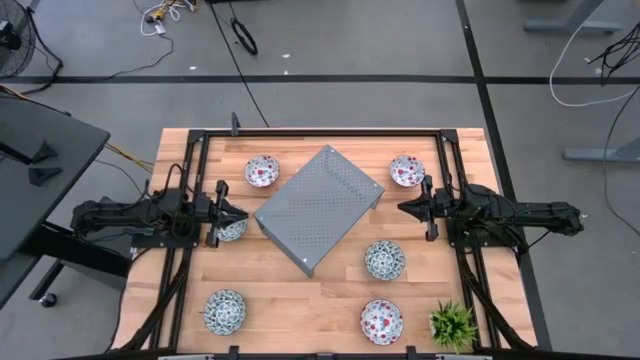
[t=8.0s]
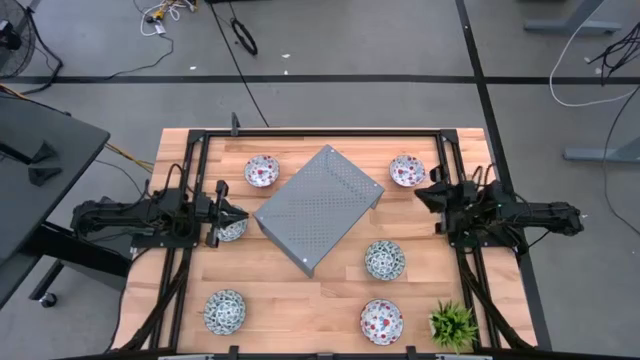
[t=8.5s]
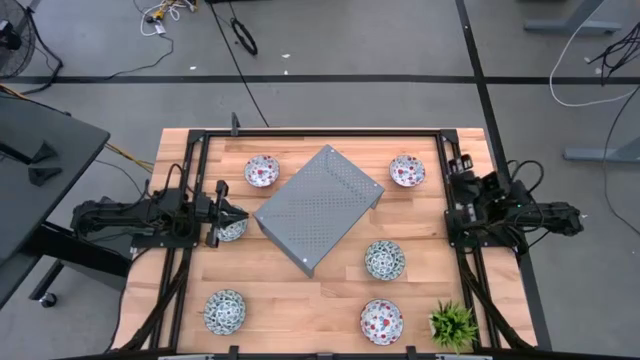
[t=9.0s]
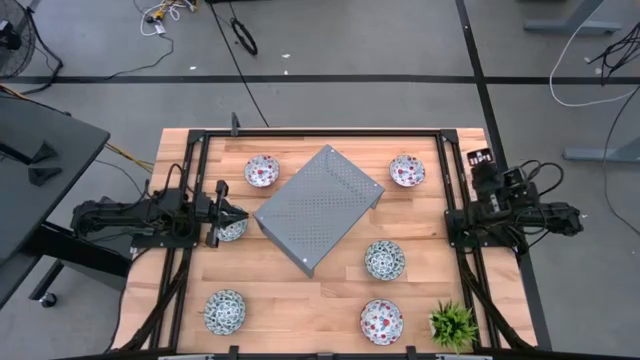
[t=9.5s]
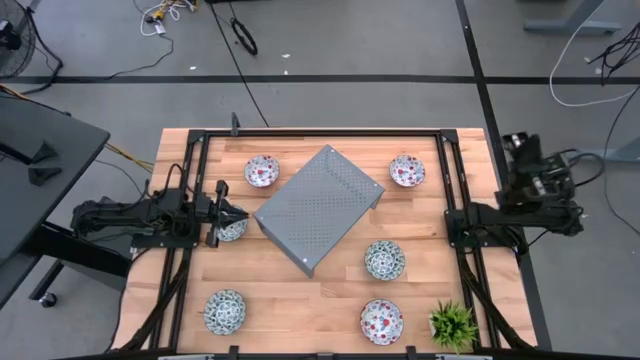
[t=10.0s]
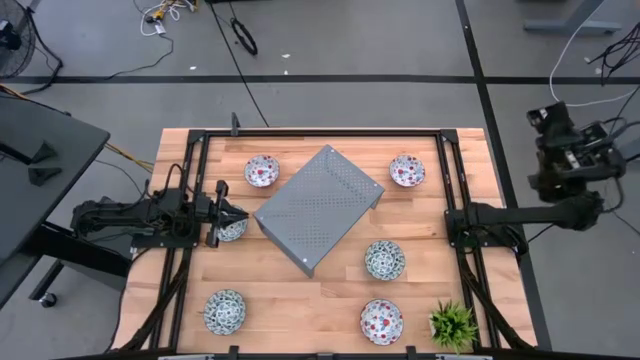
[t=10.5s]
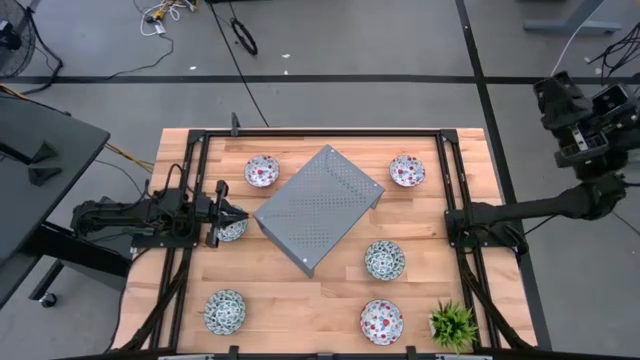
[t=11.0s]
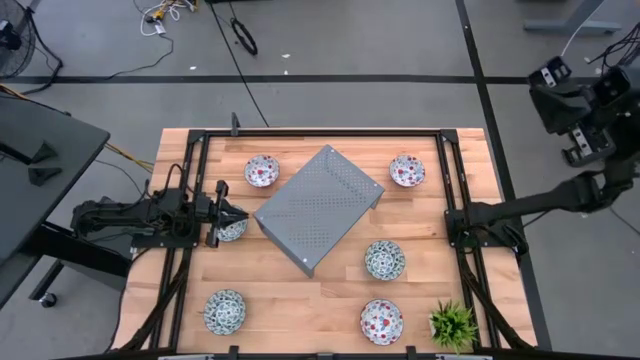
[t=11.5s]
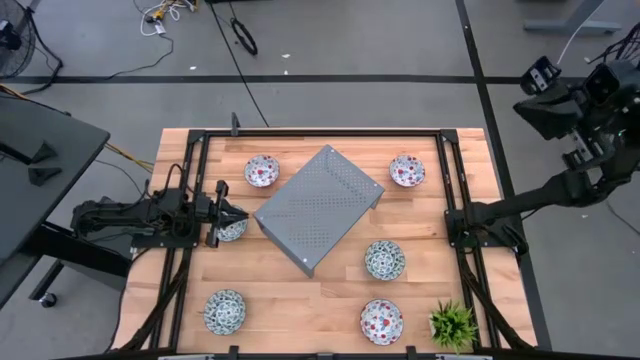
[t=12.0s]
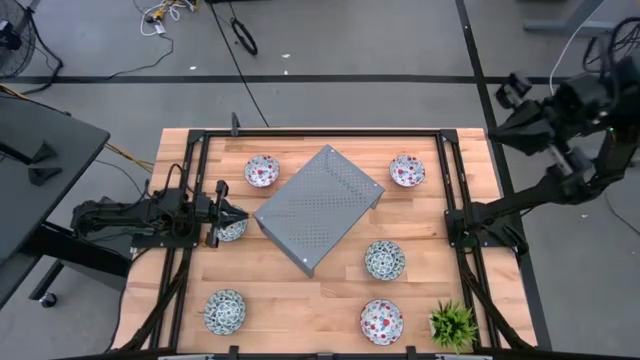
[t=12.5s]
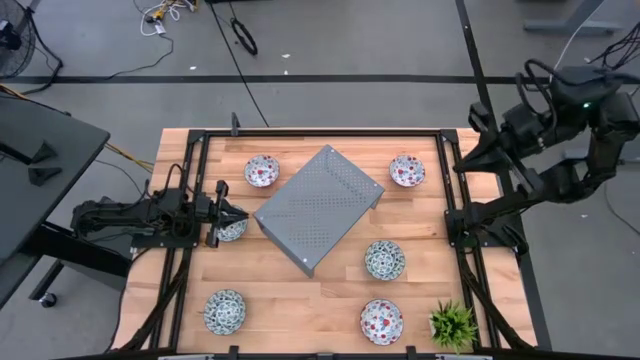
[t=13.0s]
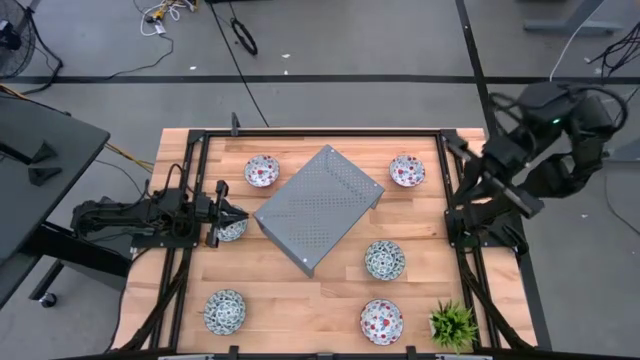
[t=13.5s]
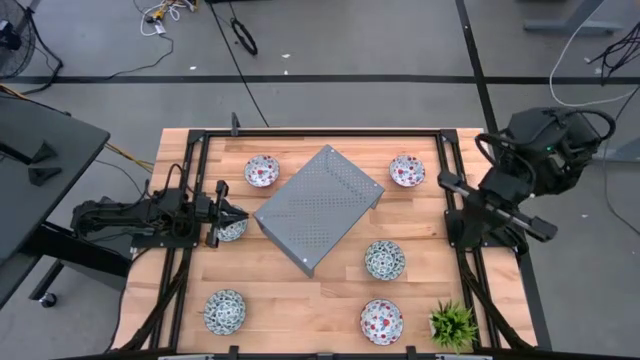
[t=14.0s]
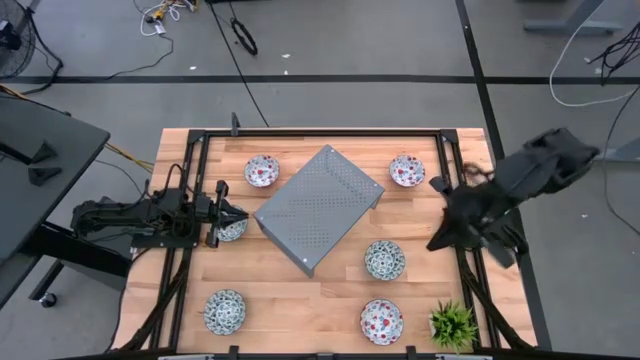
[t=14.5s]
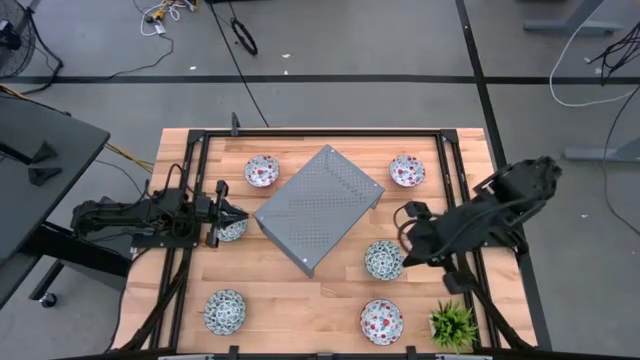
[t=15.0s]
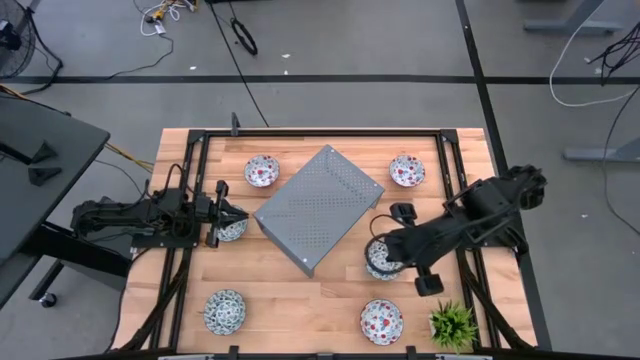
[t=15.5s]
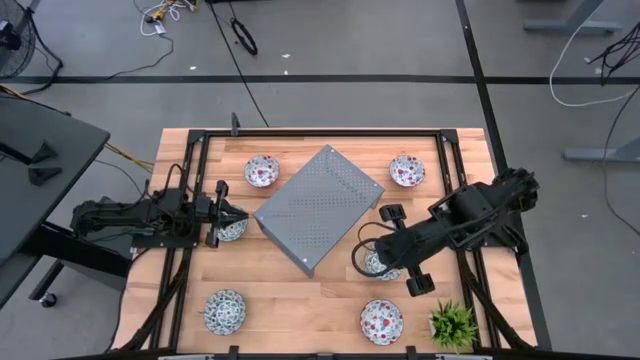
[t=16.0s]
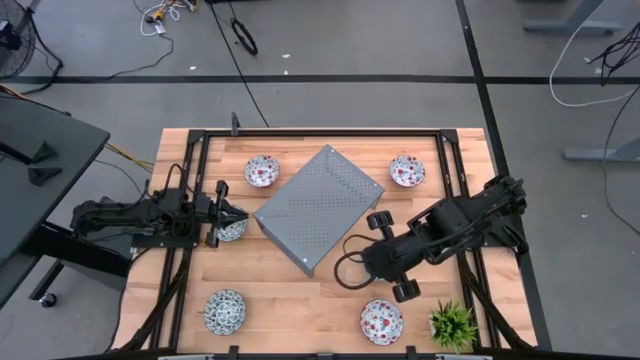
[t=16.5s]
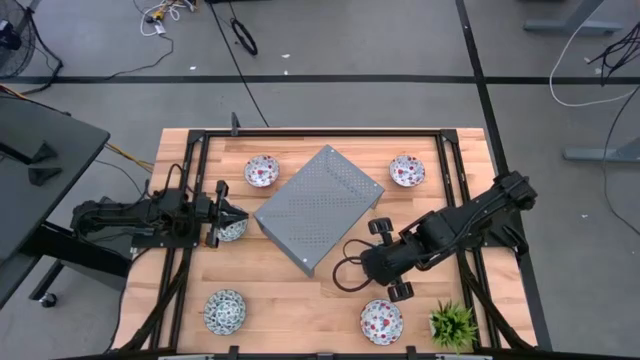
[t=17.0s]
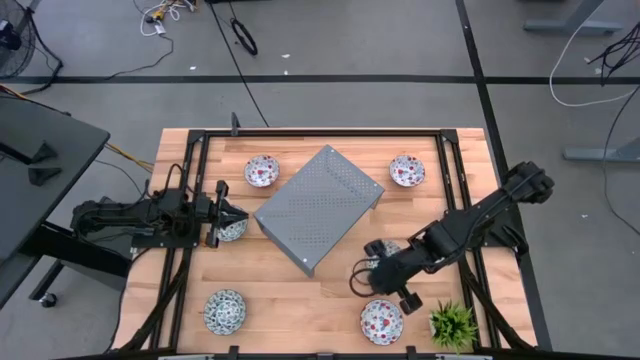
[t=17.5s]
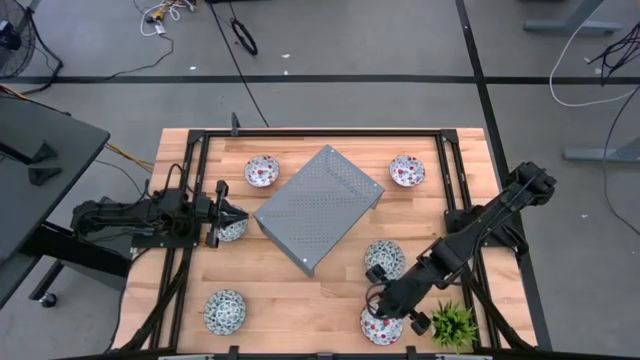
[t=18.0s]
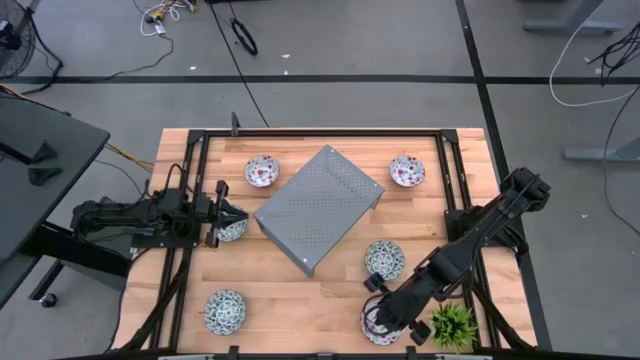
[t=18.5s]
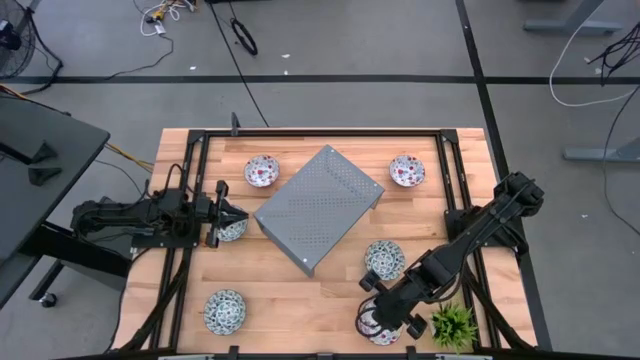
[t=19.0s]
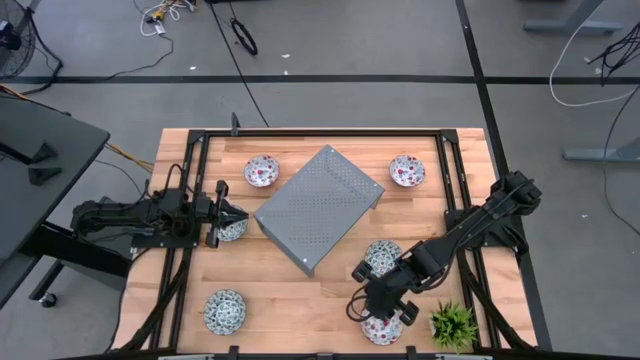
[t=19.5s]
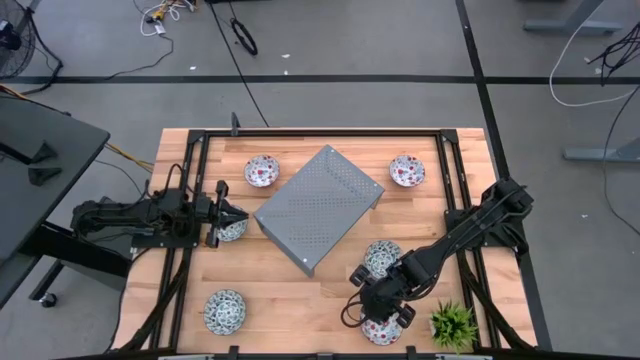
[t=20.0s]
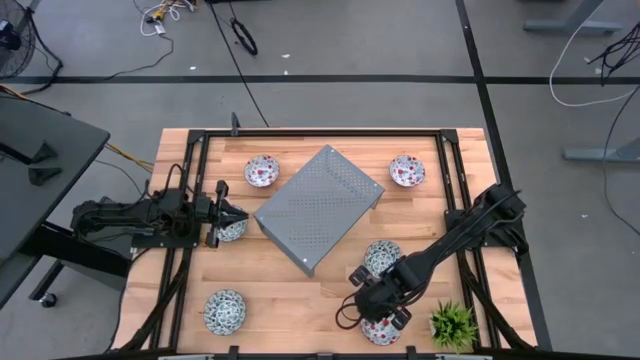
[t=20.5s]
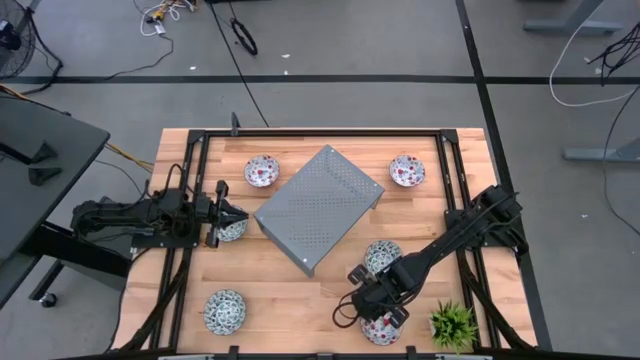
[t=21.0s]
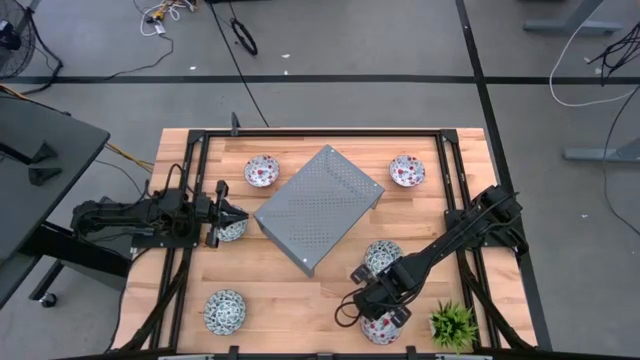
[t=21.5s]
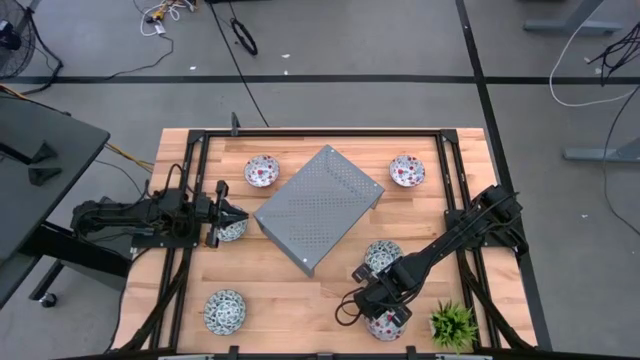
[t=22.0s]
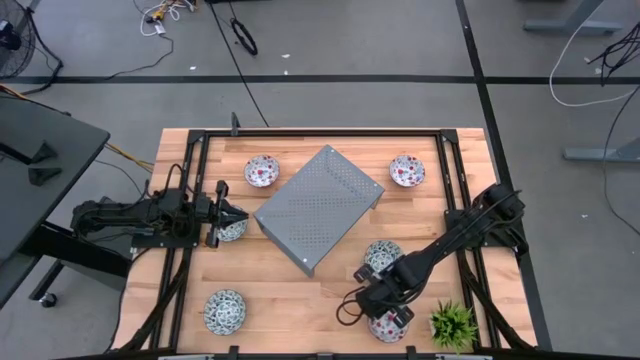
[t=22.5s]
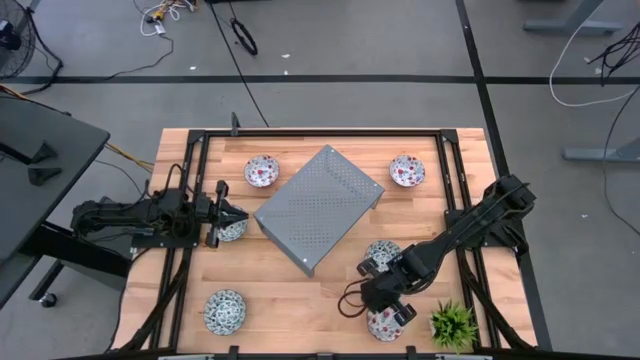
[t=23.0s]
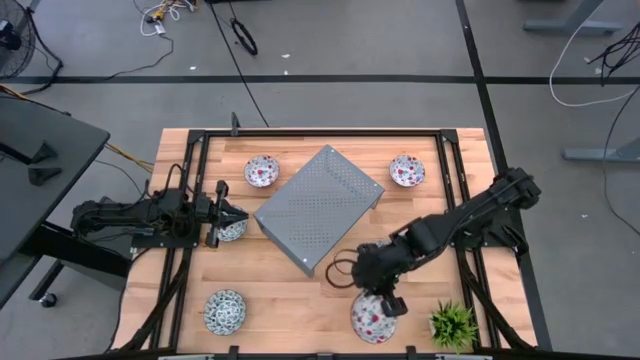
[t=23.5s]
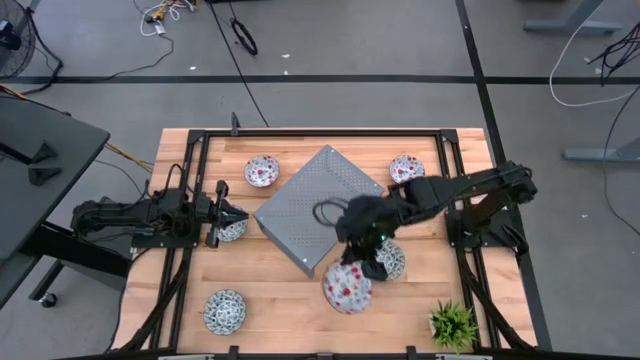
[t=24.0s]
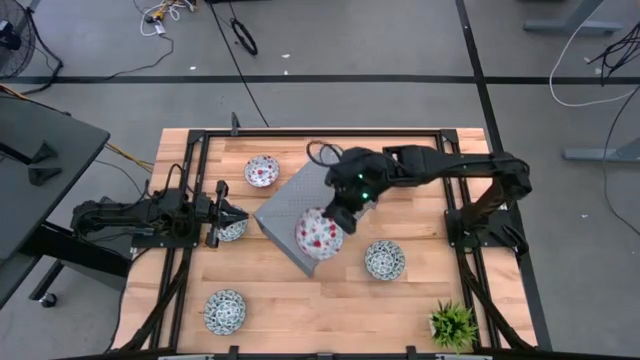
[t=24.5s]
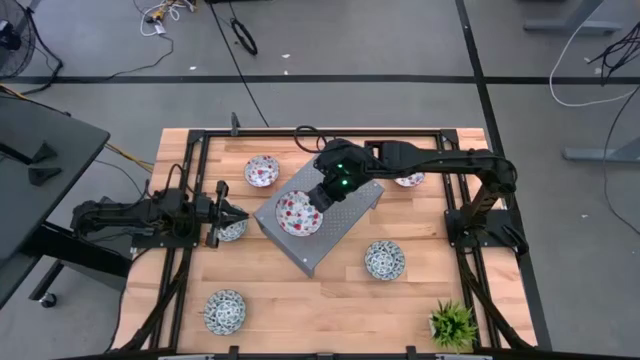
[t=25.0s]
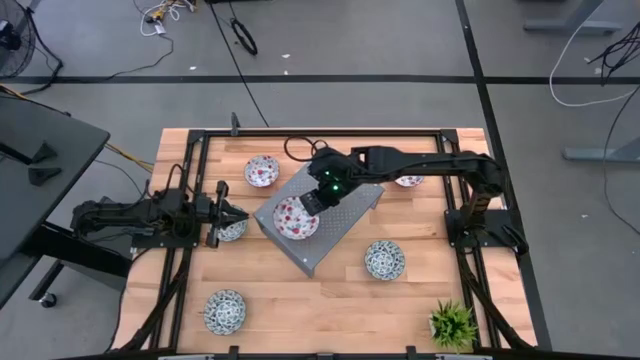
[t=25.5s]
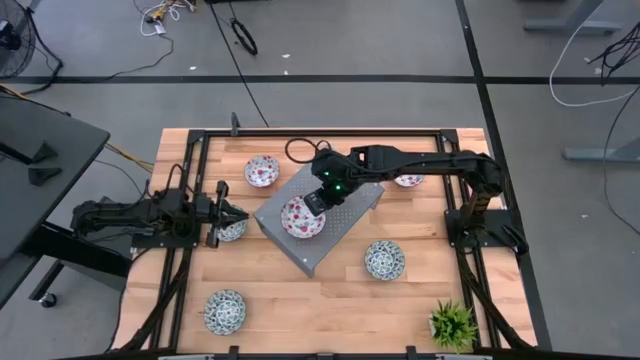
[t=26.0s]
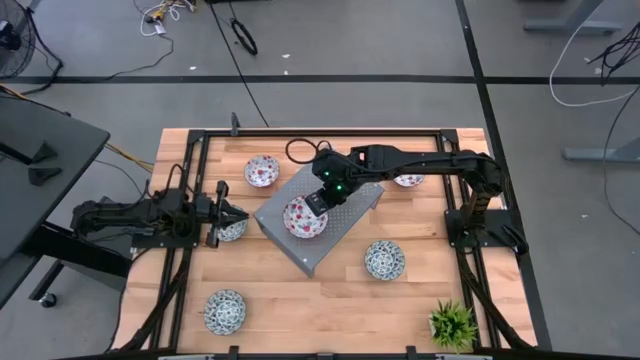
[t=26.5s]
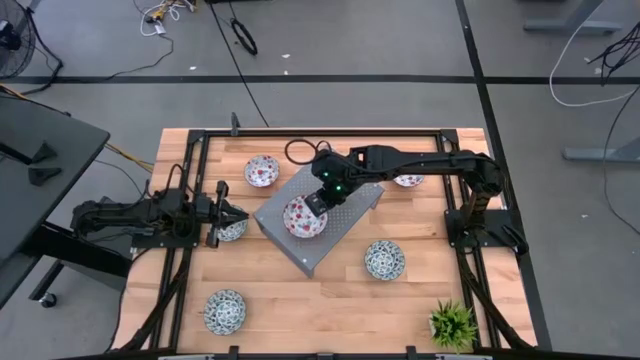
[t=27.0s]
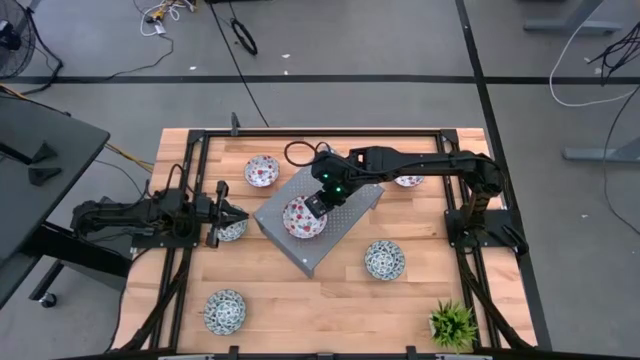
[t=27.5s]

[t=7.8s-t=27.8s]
Task: Pick & Place Mini bowls
Put the bottom red patterned bowl on the shelf
